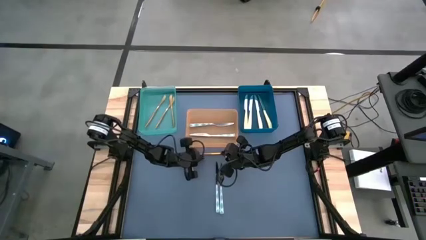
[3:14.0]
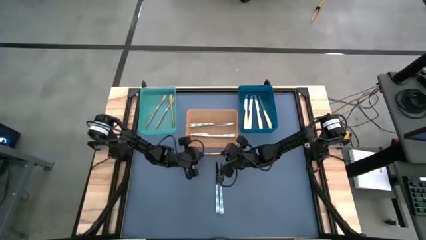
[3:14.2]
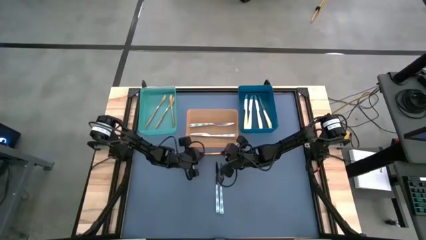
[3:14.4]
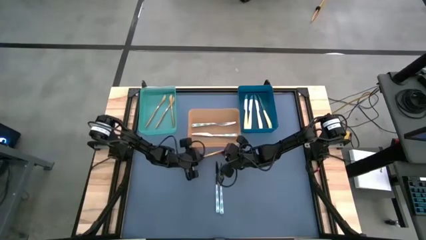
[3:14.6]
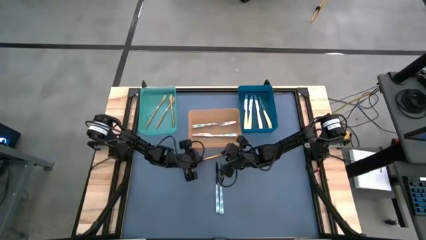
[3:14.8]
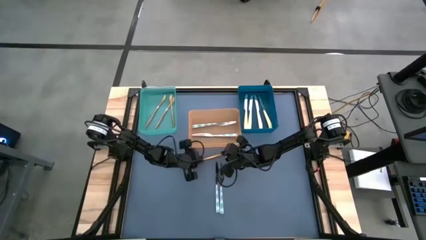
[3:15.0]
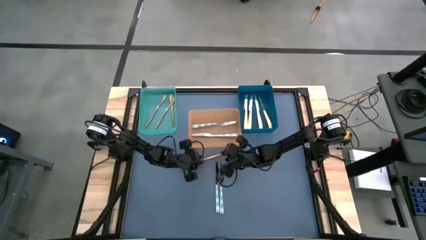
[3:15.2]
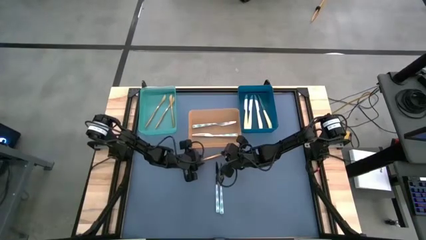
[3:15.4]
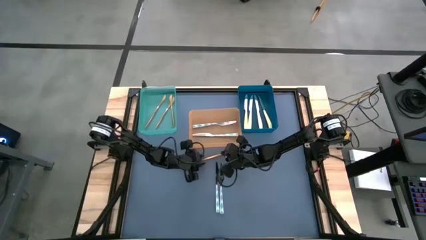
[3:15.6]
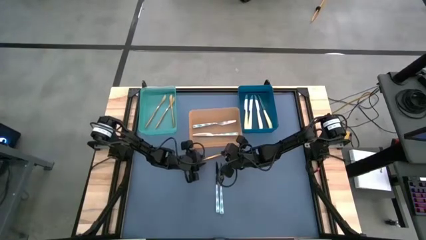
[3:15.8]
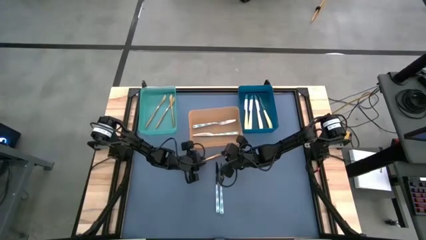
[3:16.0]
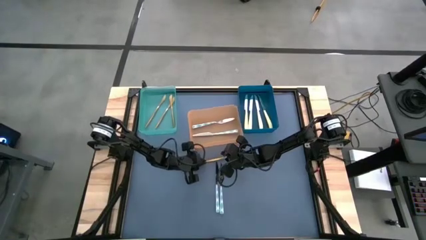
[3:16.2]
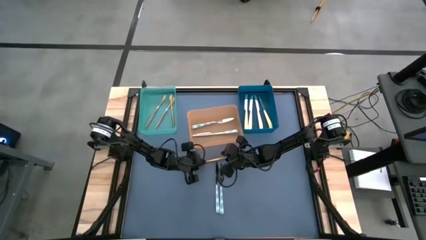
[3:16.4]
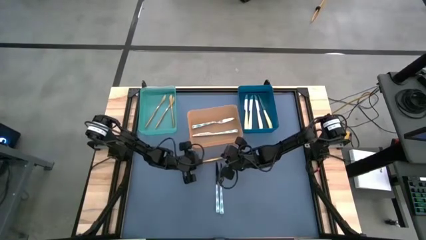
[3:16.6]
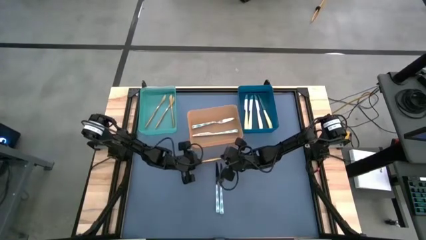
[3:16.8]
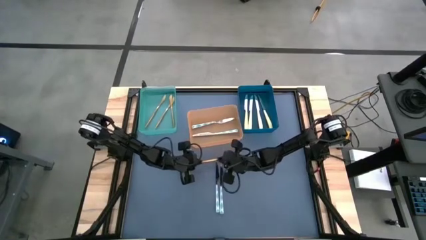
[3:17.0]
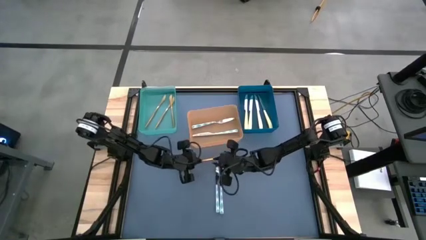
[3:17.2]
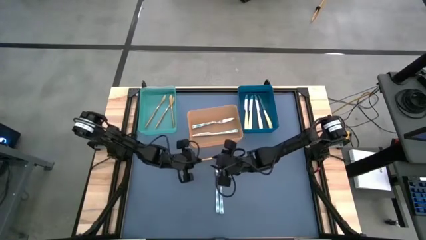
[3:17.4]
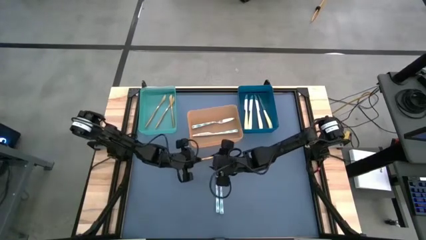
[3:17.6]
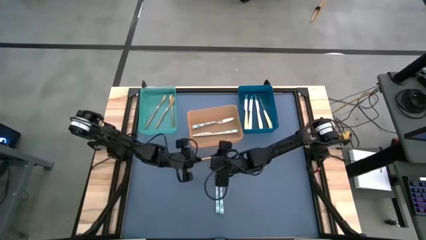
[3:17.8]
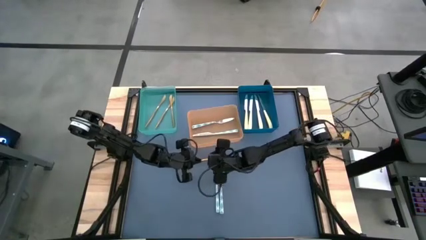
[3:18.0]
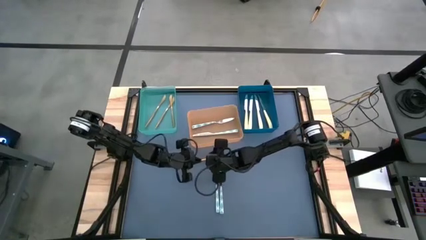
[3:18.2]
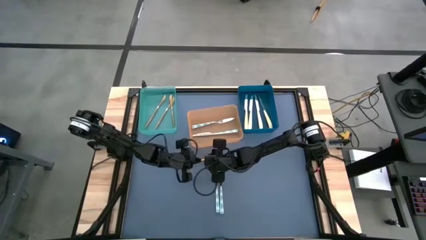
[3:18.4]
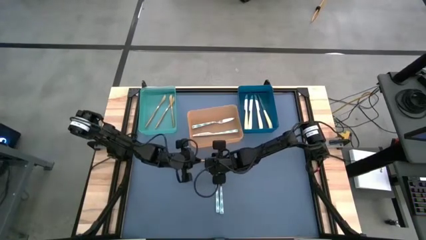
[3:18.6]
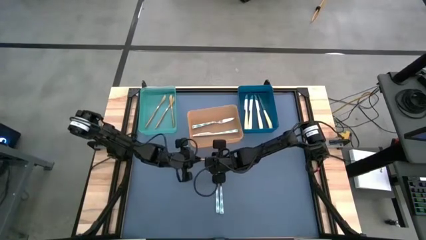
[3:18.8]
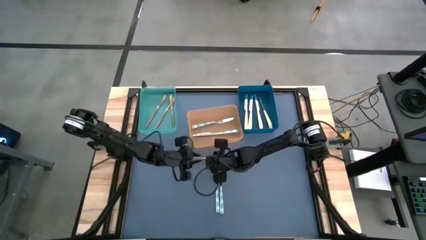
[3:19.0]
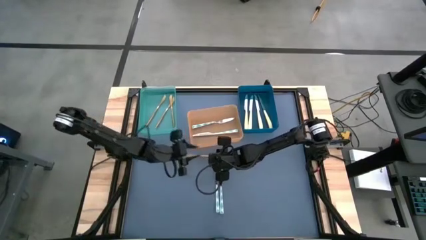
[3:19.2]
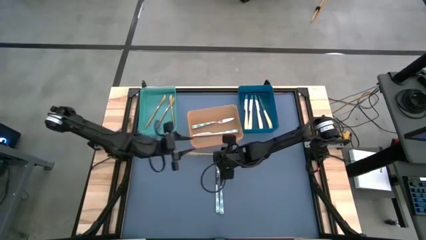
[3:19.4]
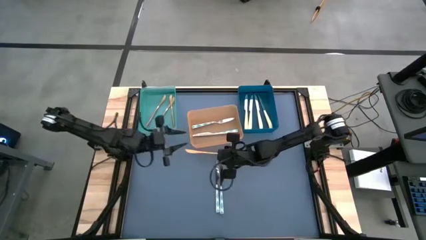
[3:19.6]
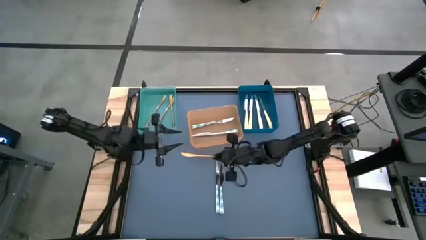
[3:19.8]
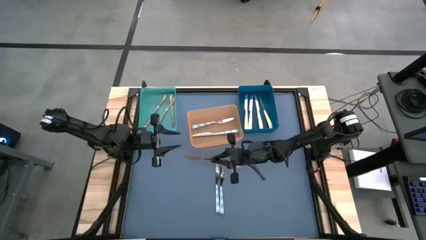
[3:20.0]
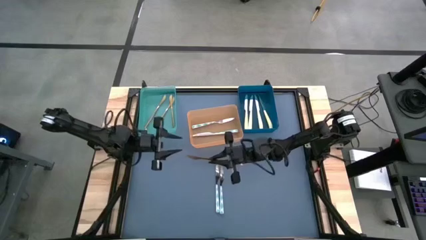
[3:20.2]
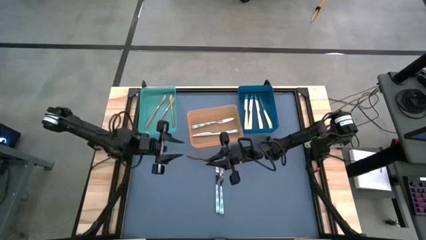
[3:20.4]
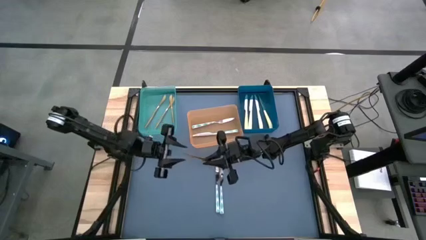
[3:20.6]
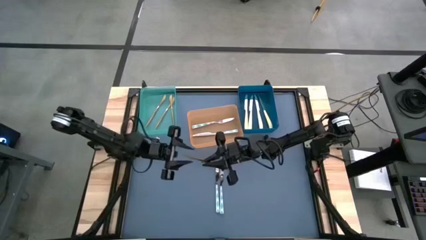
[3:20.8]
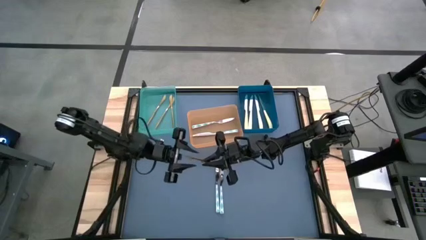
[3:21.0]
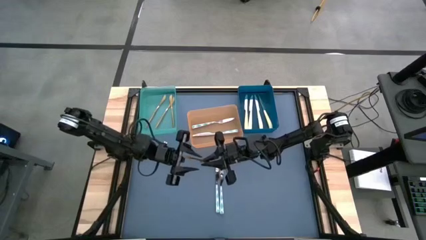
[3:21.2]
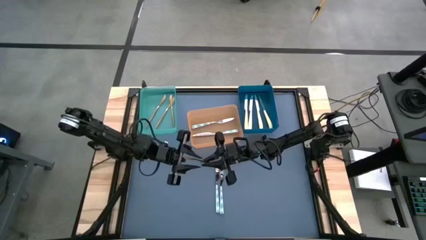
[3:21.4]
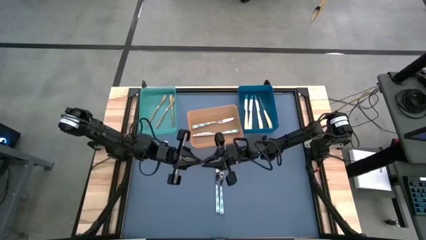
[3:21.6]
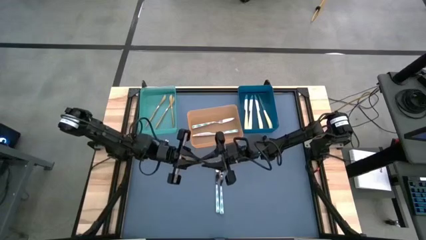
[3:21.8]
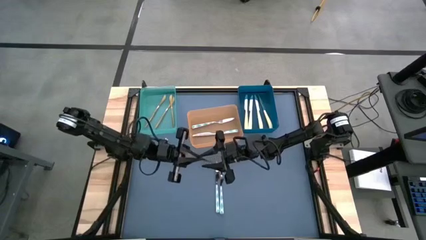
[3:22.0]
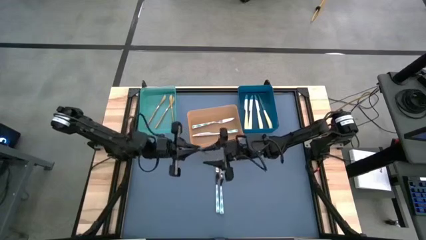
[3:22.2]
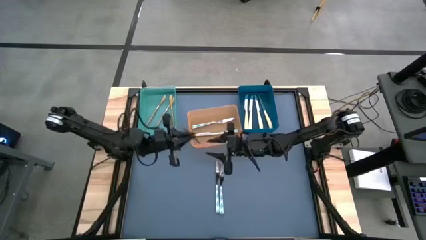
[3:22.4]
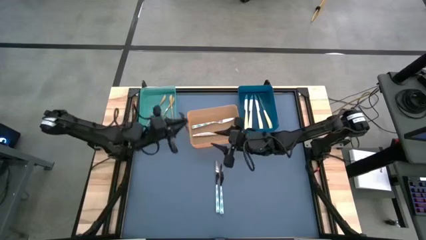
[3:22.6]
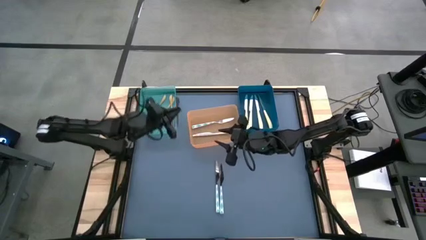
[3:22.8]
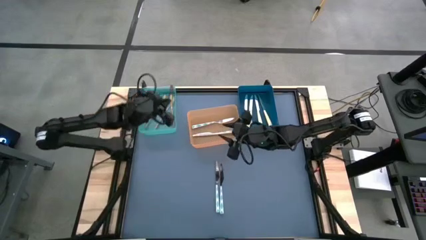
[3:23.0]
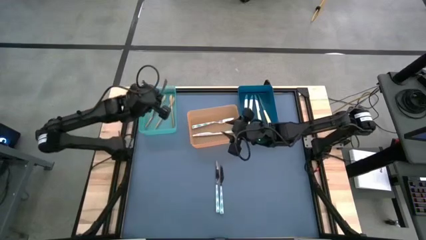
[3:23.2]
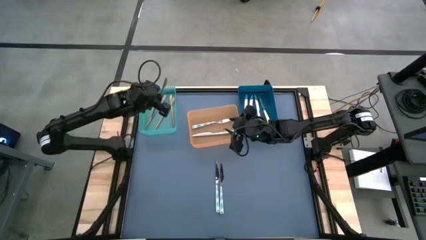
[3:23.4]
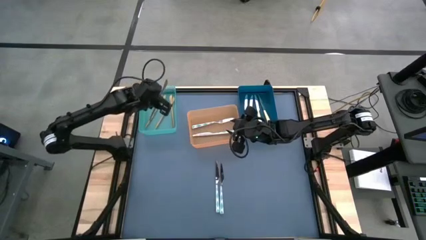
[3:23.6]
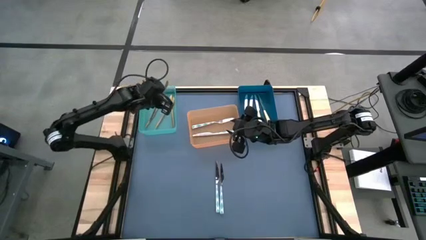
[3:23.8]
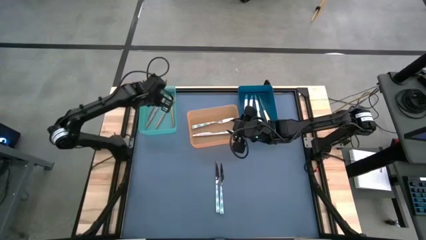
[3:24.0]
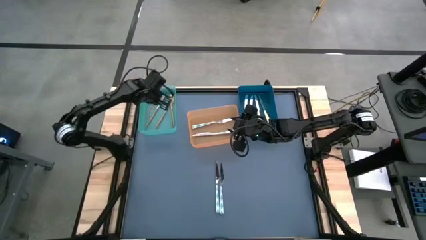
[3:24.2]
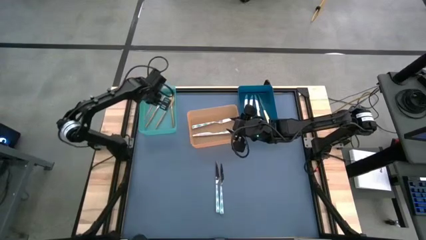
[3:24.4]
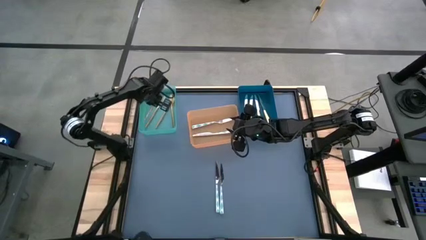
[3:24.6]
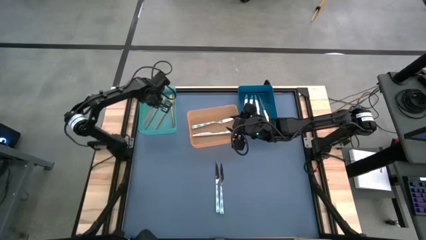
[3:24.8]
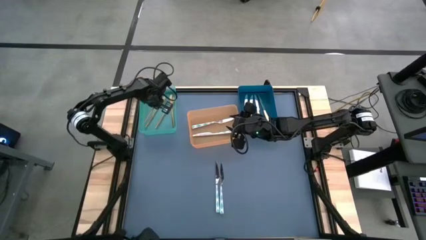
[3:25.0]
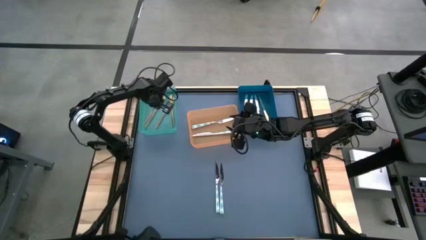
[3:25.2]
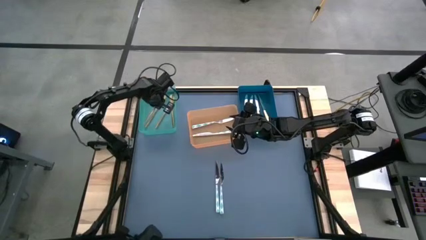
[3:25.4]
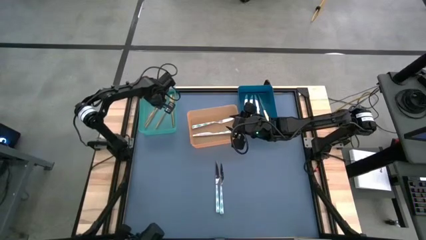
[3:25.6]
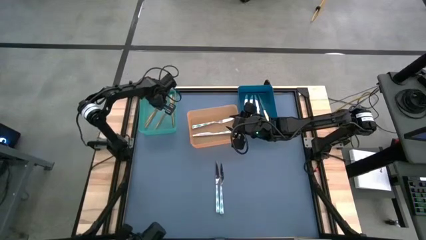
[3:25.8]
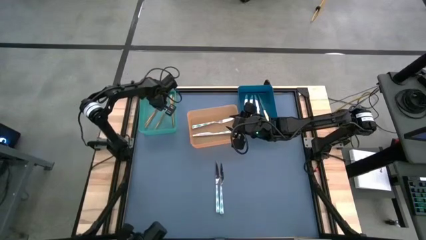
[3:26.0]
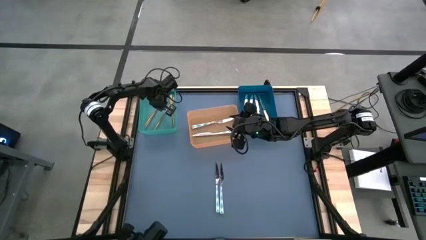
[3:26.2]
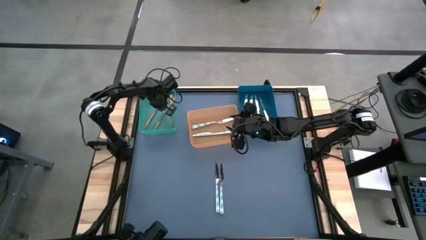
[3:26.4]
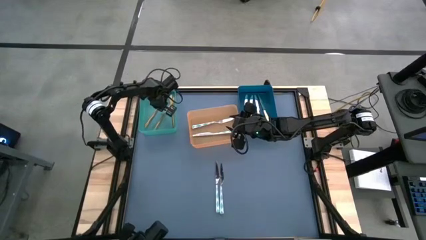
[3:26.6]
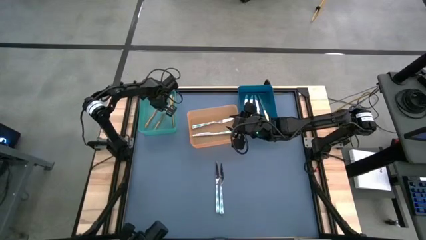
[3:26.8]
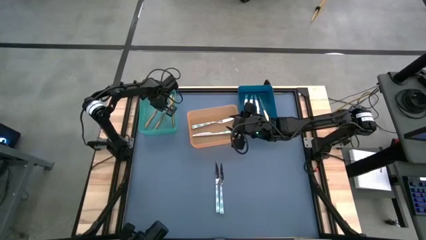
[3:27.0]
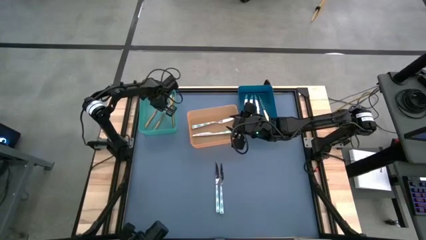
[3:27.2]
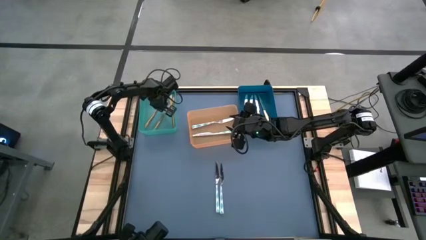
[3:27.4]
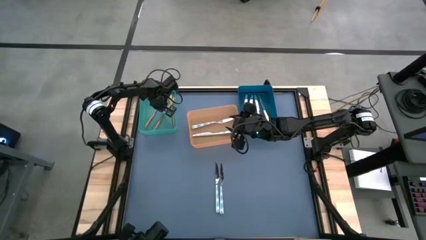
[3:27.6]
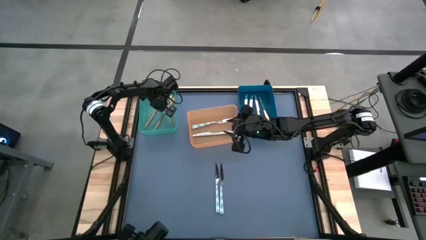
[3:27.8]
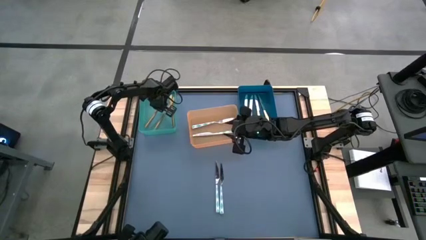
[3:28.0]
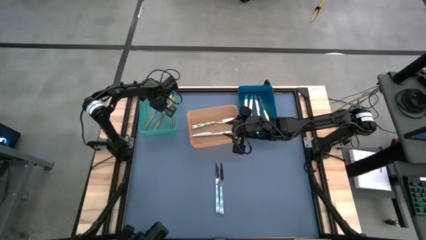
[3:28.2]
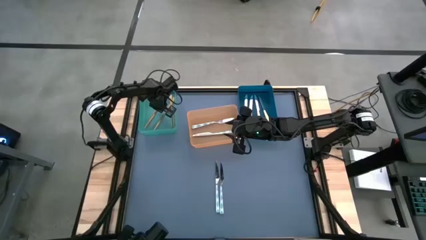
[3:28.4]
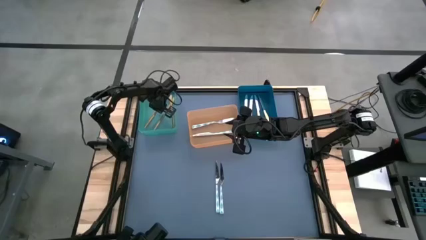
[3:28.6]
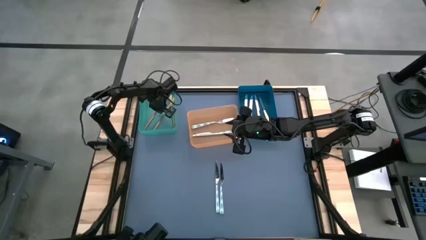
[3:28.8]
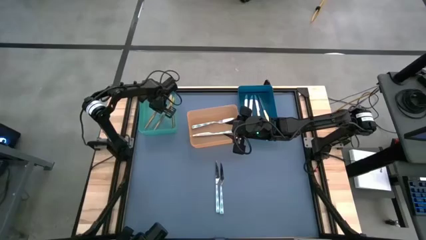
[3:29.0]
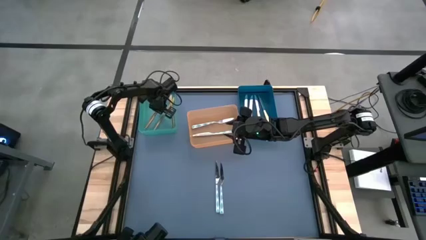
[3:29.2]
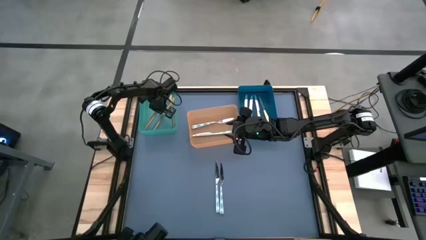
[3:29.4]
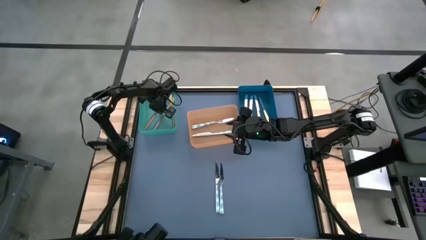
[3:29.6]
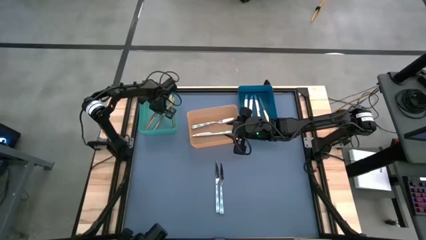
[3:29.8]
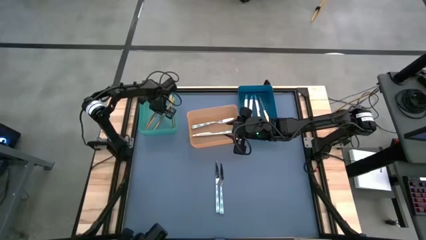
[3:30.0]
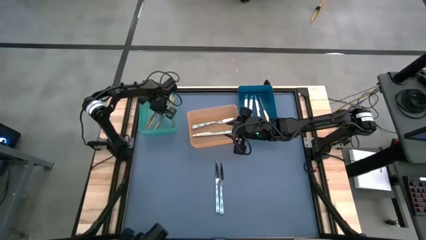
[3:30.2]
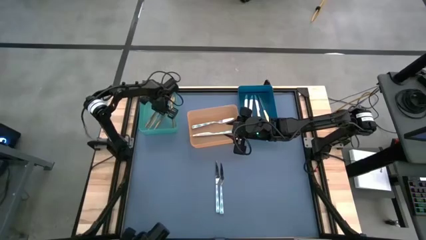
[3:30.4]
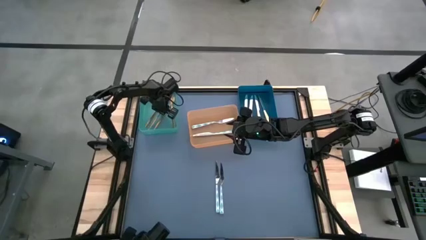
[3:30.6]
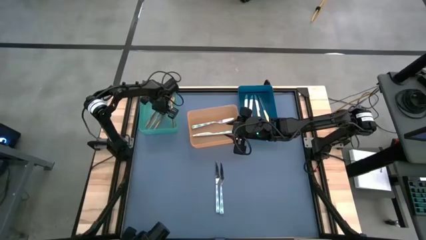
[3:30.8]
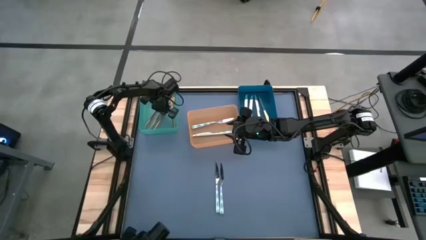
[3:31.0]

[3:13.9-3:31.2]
Task: Sort silverware by color (type)
Put the gold knife into the green bin
